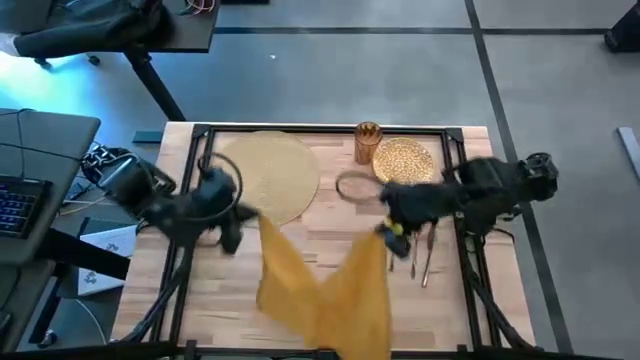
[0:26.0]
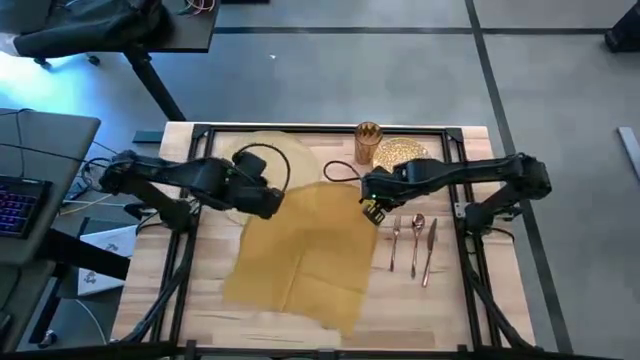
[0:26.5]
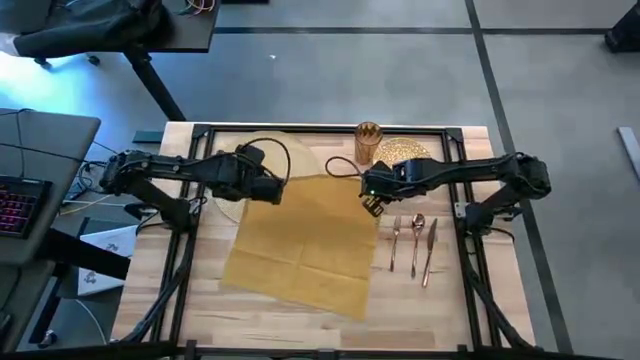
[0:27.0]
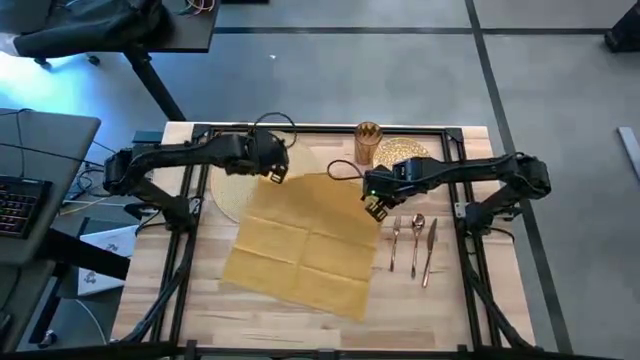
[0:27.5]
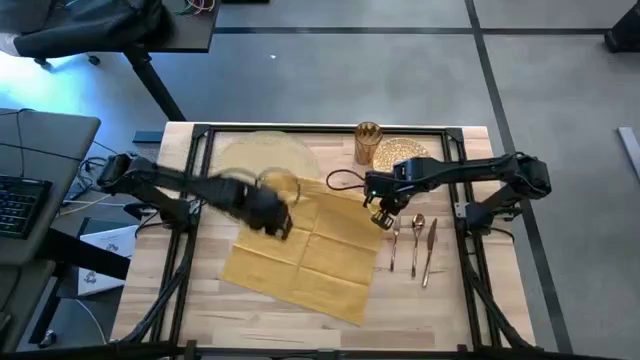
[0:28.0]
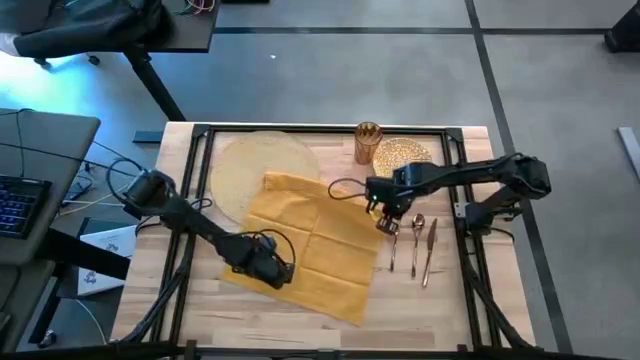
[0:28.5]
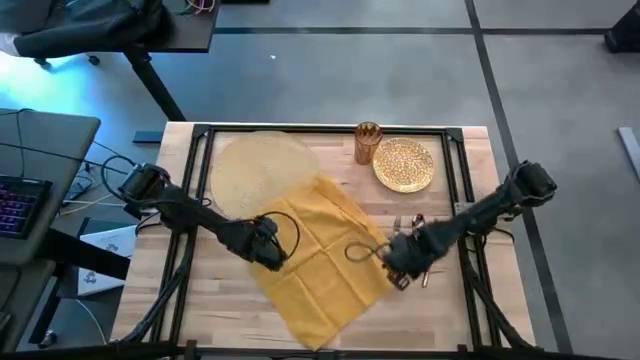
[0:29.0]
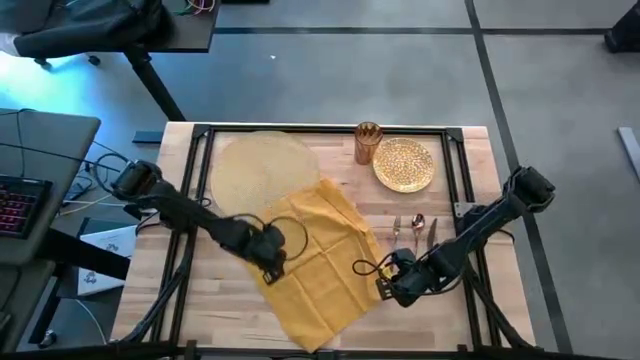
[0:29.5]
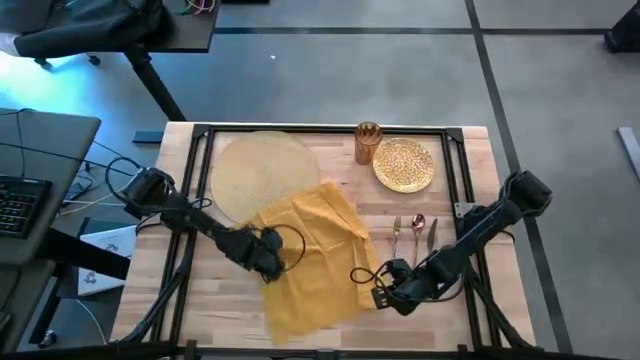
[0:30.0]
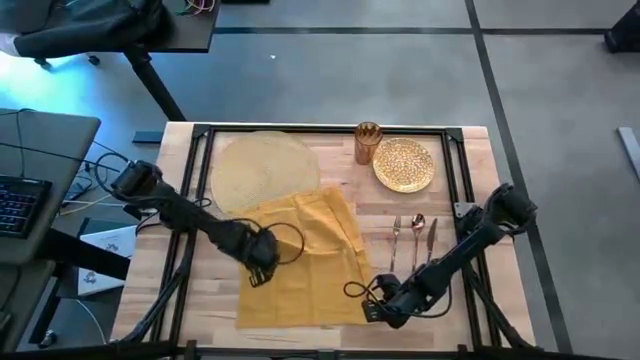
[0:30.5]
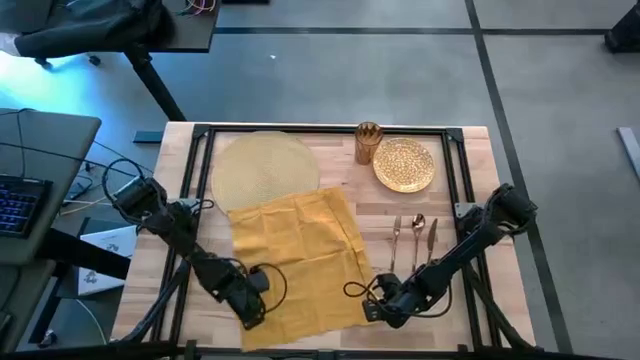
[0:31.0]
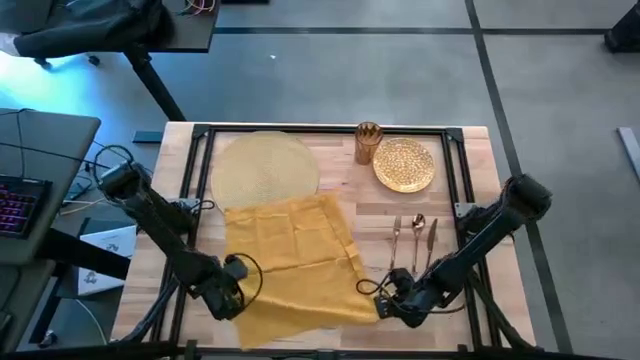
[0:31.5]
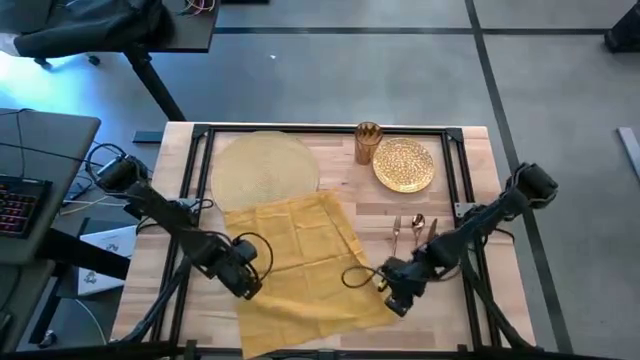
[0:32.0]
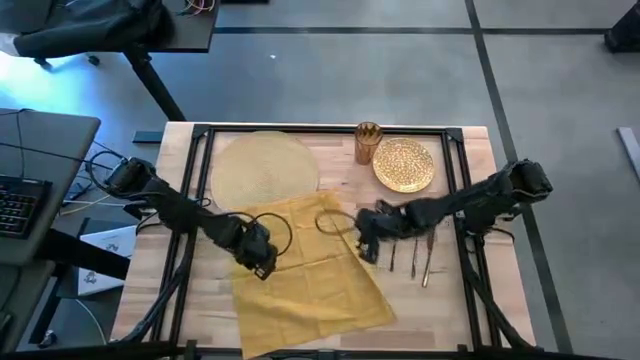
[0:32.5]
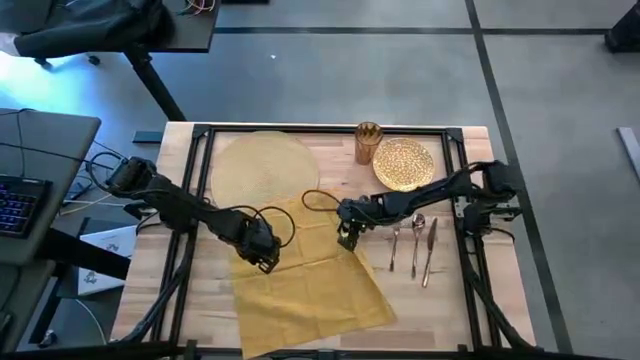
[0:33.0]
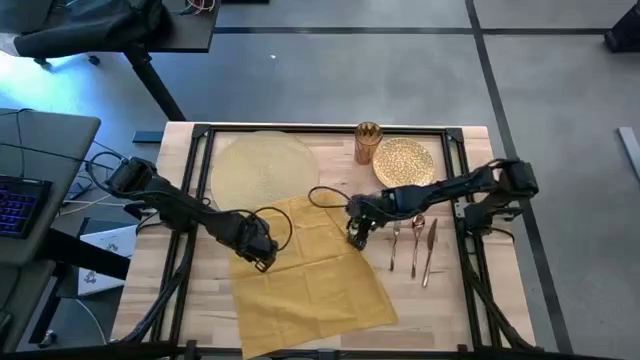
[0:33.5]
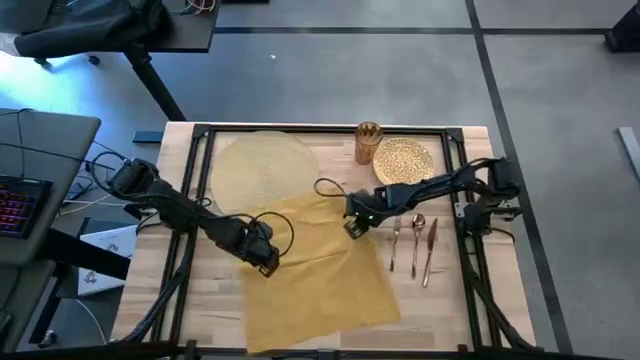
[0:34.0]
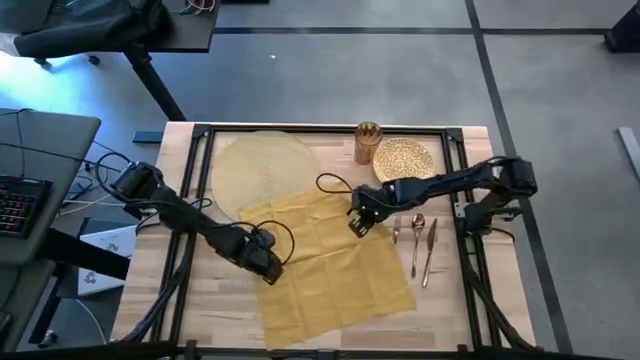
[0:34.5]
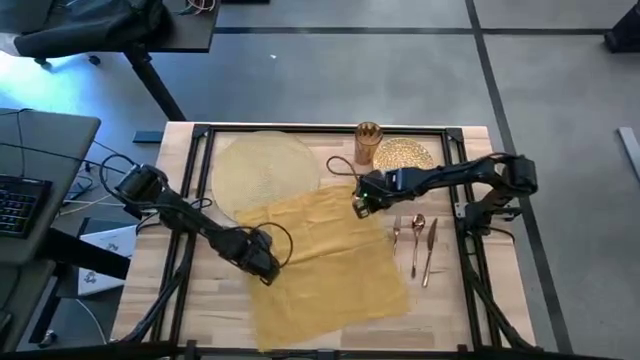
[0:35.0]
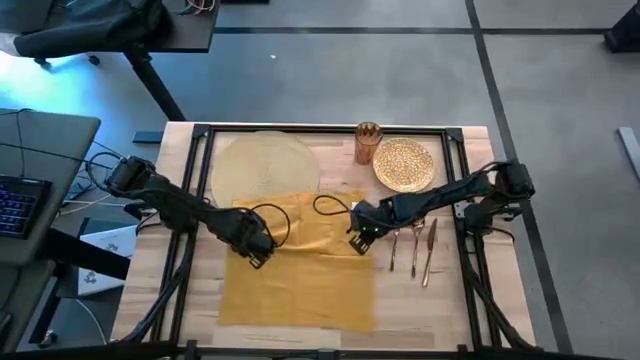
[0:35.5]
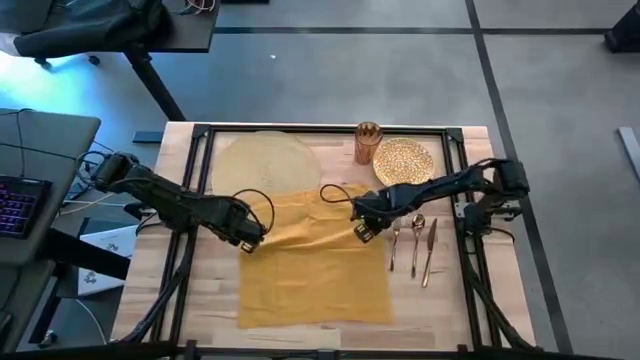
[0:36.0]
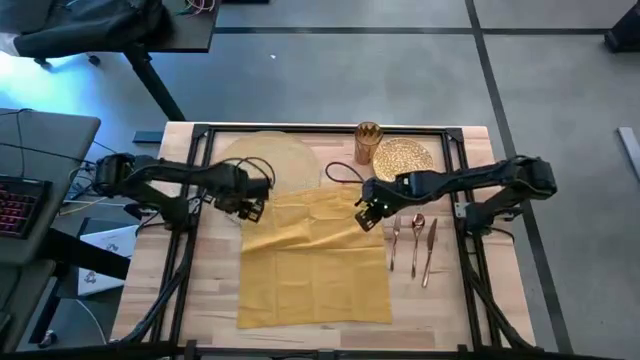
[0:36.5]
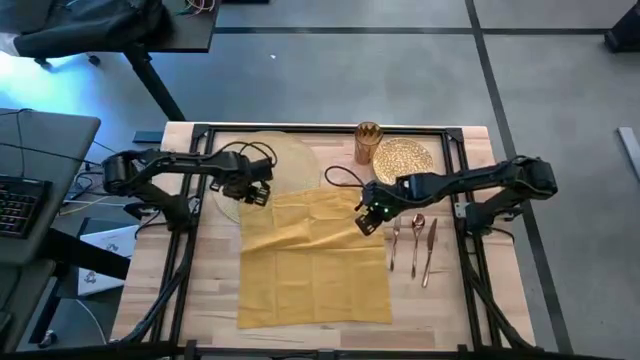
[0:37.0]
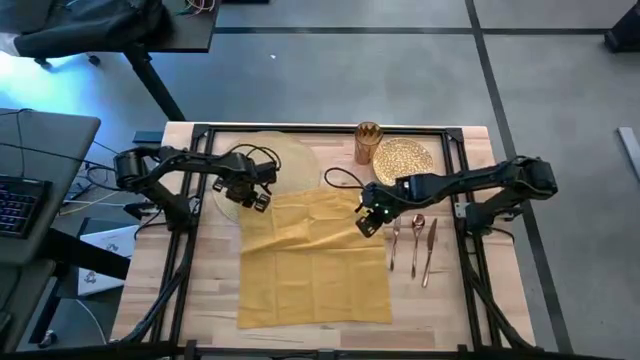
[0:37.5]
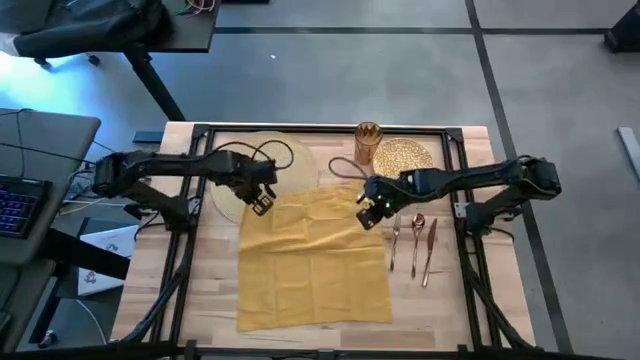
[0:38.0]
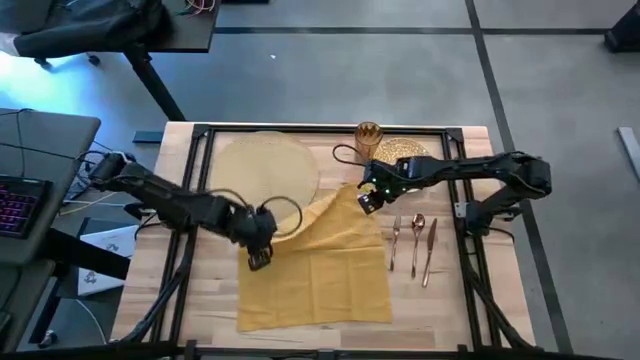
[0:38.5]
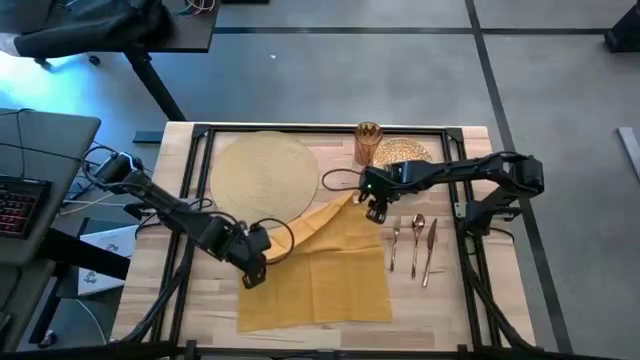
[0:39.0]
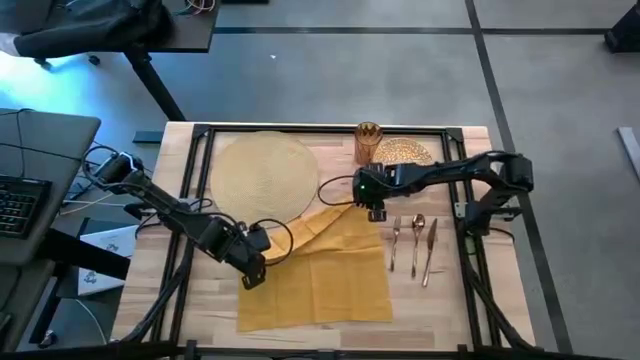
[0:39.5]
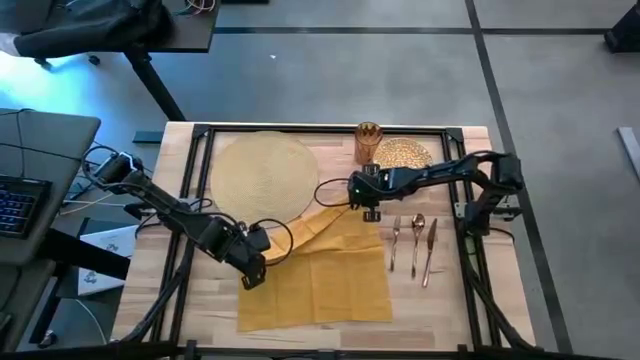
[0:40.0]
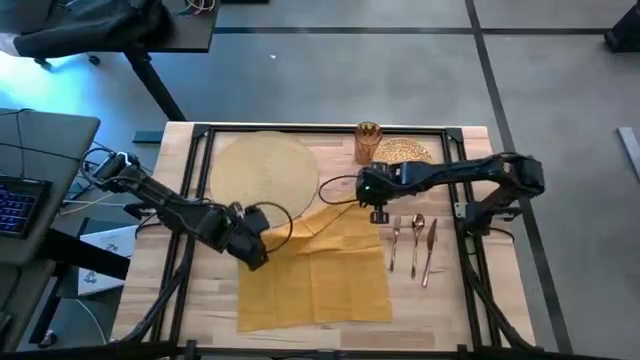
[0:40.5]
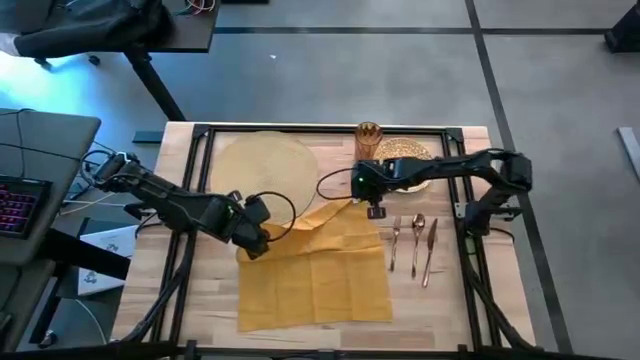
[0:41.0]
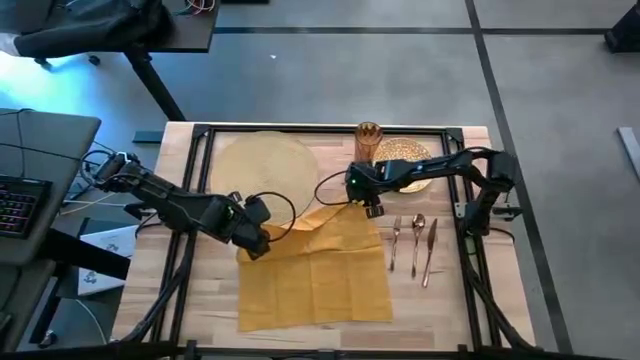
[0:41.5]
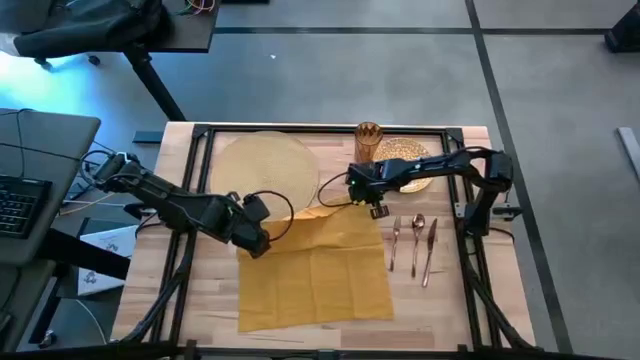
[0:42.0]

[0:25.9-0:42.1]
Task: Set table place
Fold the yellow table napkin

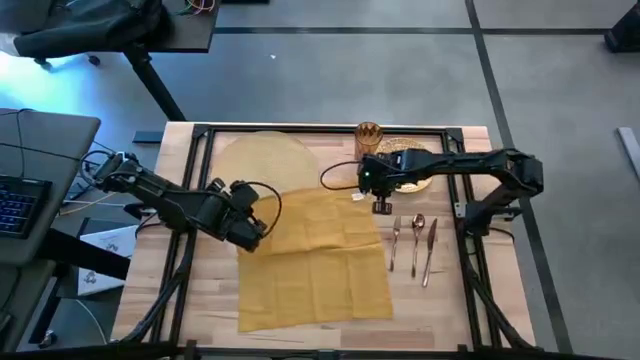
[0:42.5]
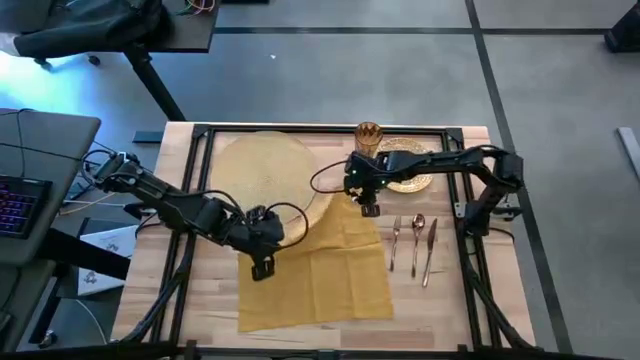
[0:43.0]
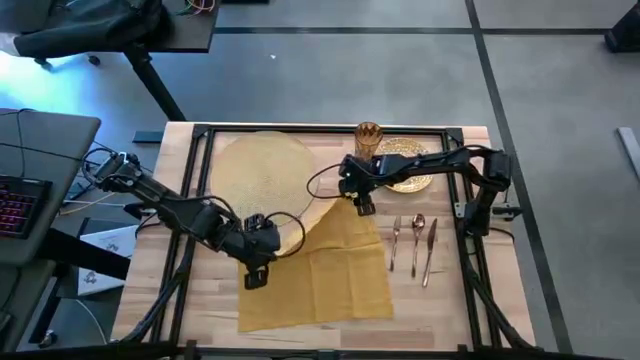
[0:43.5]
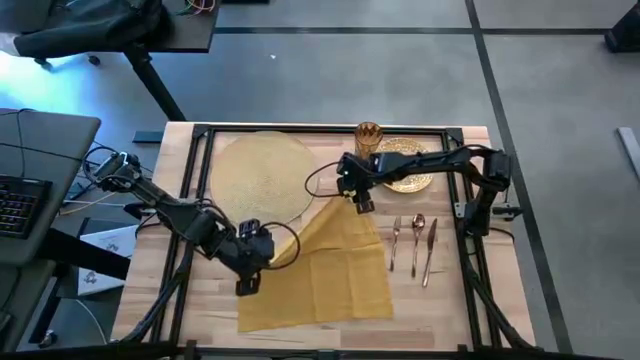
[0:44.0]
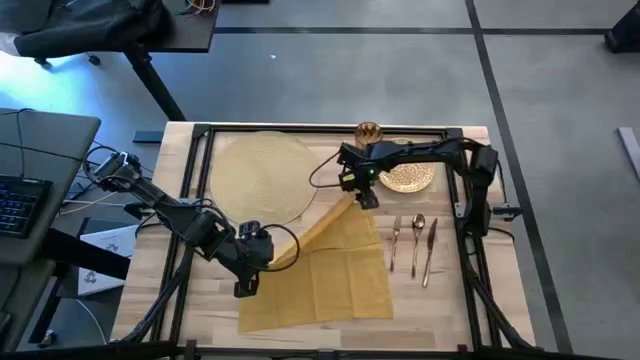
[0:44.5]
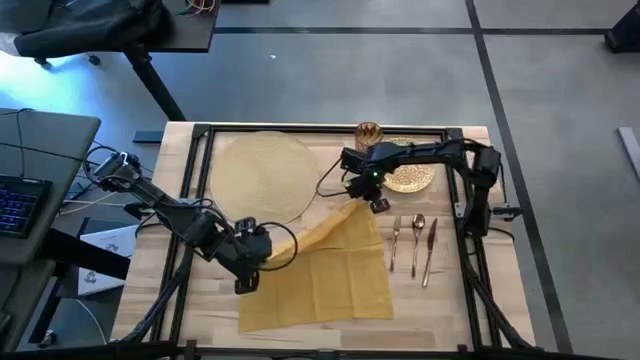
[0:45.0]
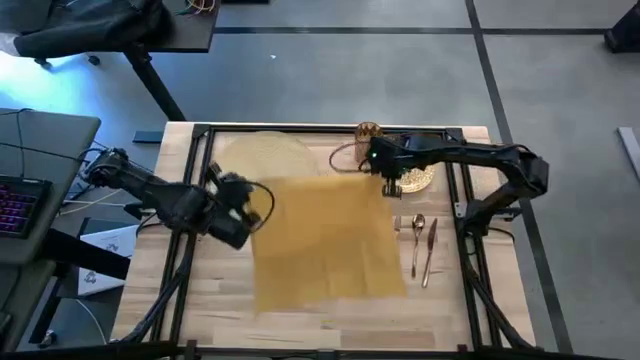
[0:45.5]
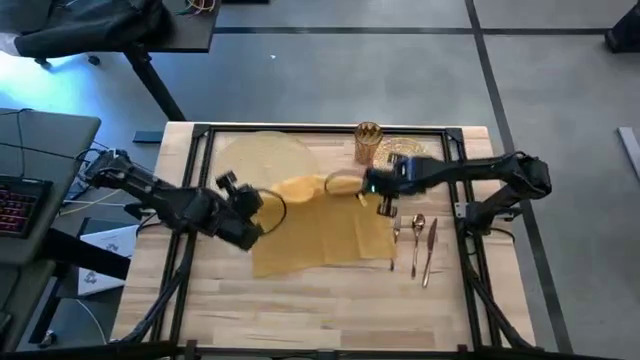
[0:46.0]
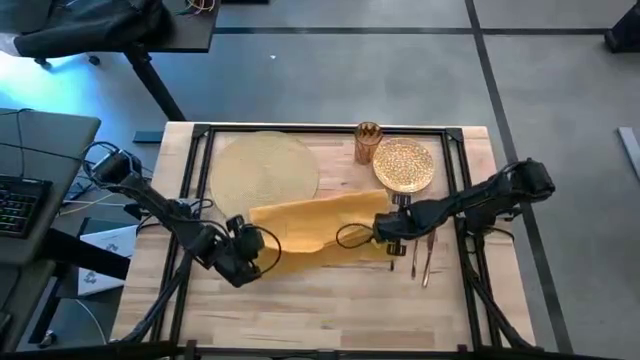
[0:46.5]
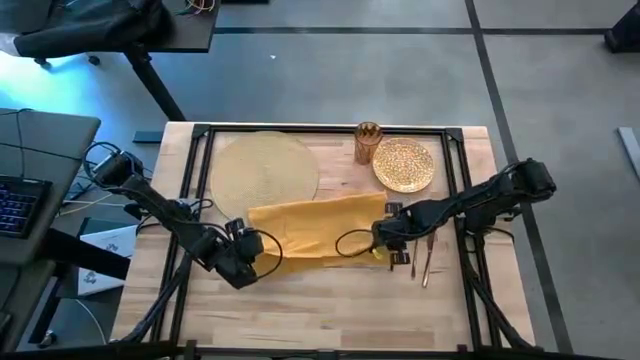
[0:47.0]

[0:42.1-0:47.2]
Fold the yellow table napkin
